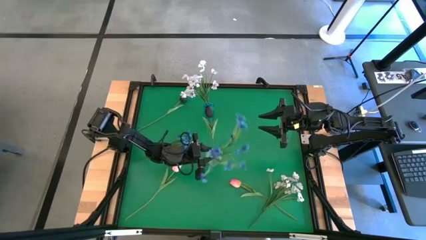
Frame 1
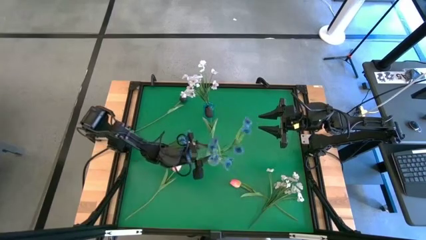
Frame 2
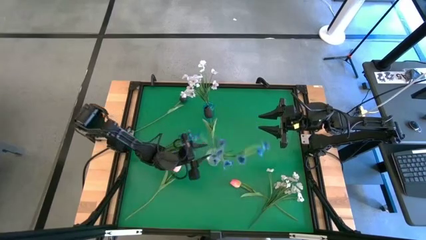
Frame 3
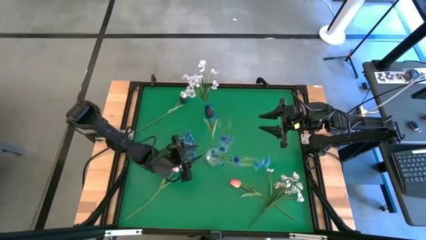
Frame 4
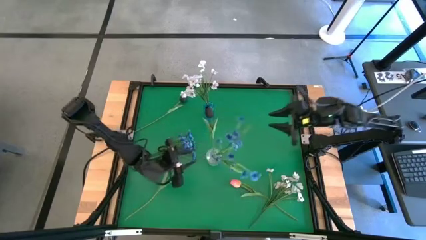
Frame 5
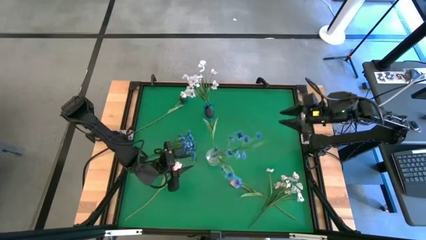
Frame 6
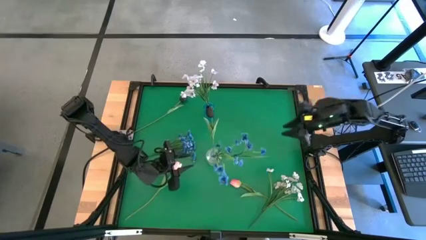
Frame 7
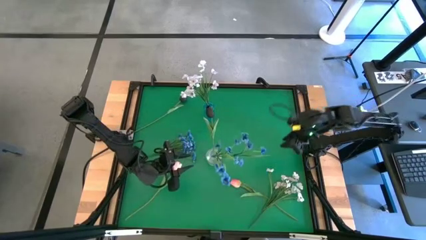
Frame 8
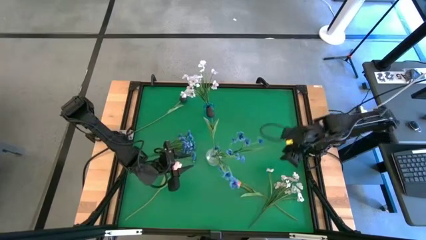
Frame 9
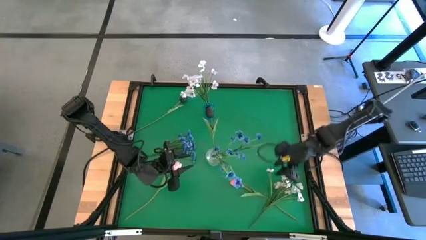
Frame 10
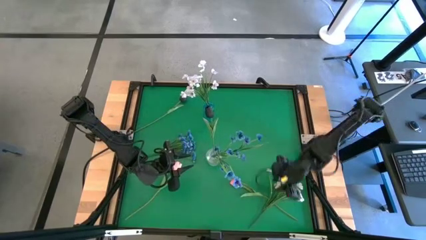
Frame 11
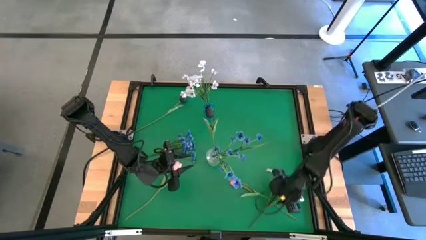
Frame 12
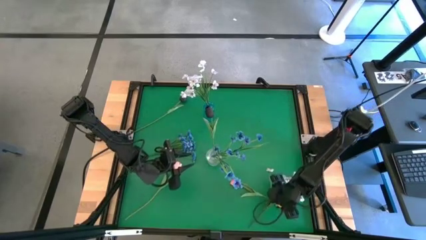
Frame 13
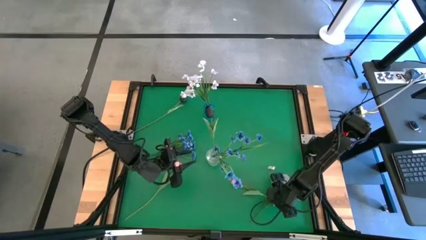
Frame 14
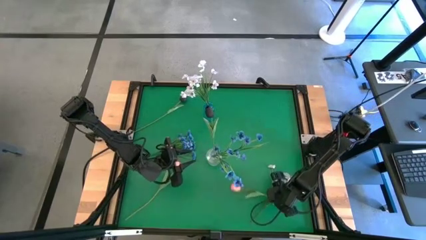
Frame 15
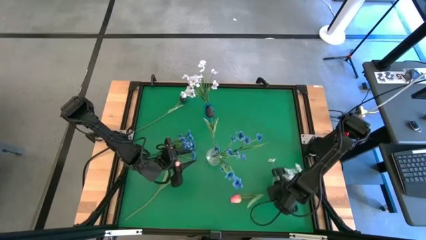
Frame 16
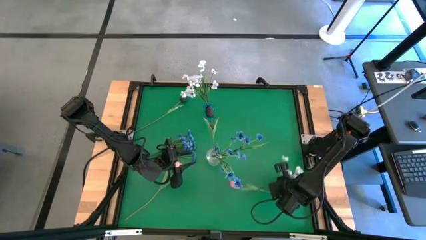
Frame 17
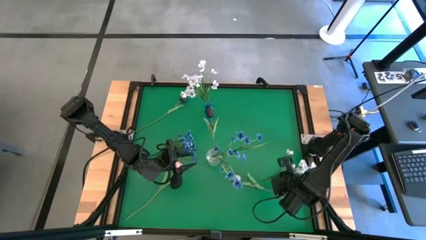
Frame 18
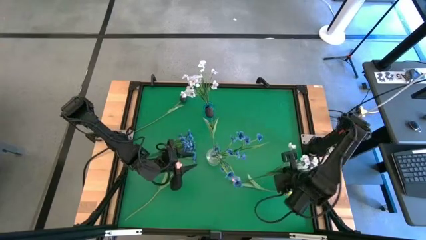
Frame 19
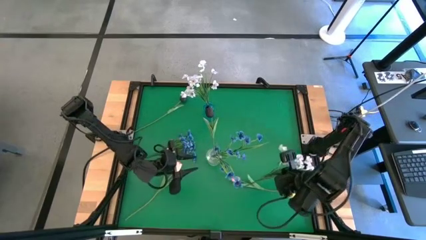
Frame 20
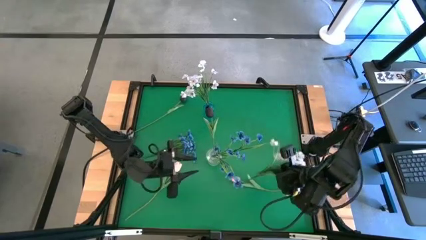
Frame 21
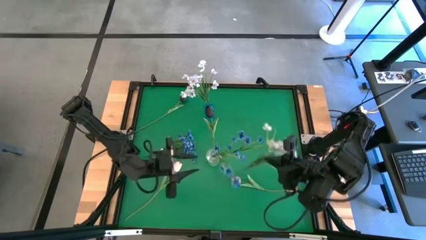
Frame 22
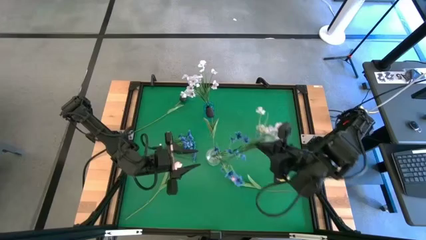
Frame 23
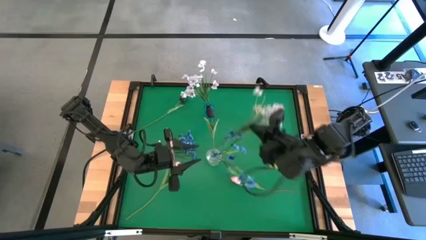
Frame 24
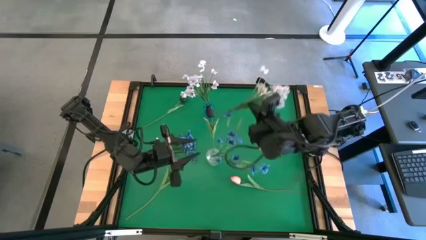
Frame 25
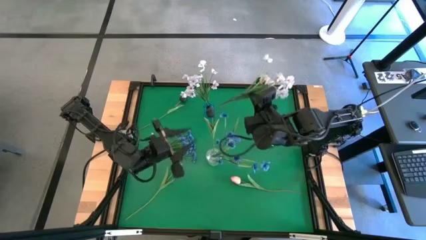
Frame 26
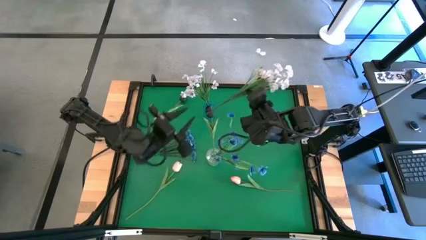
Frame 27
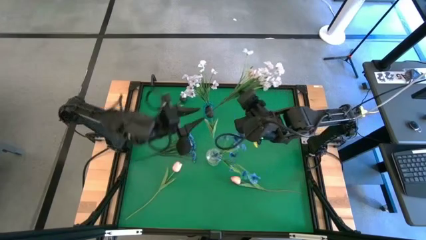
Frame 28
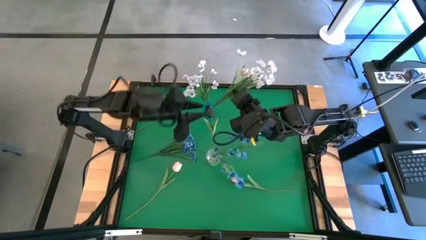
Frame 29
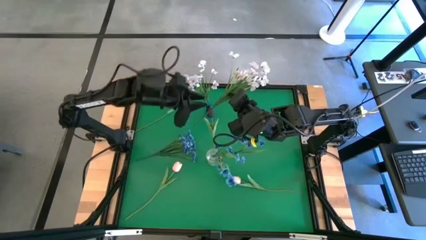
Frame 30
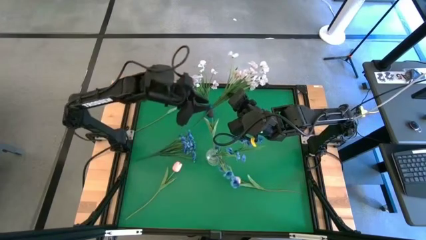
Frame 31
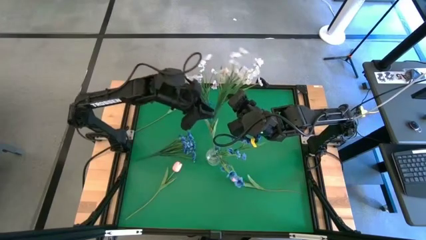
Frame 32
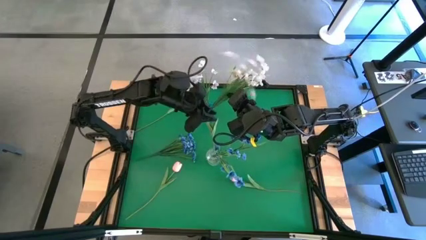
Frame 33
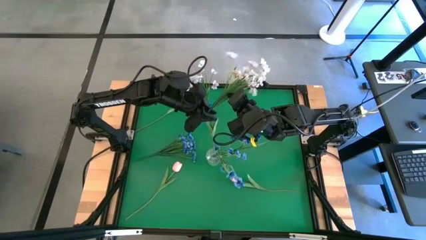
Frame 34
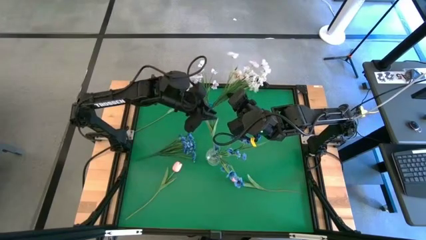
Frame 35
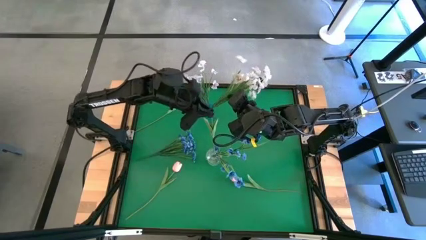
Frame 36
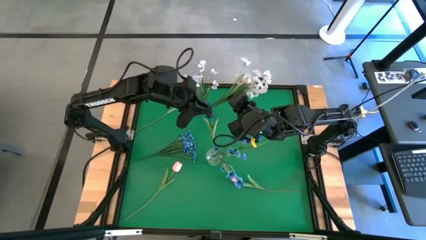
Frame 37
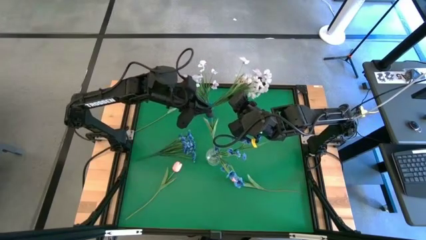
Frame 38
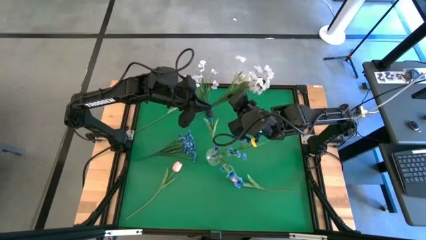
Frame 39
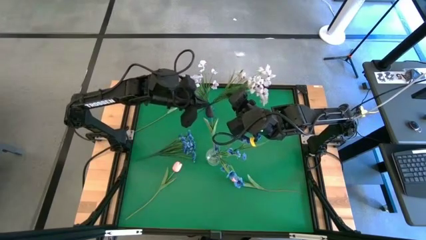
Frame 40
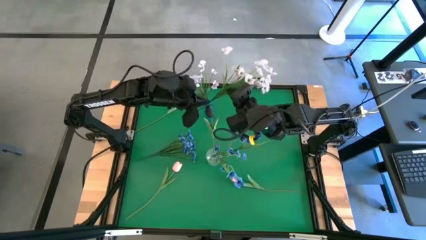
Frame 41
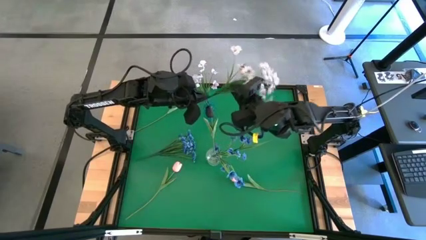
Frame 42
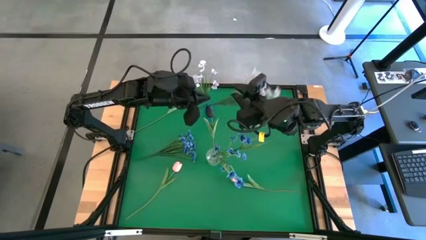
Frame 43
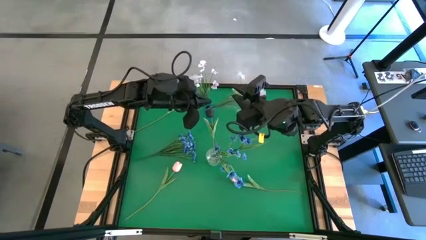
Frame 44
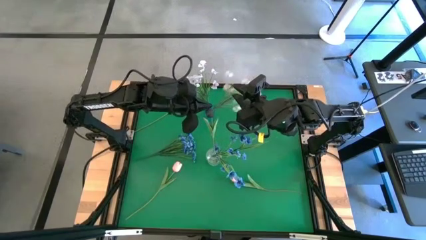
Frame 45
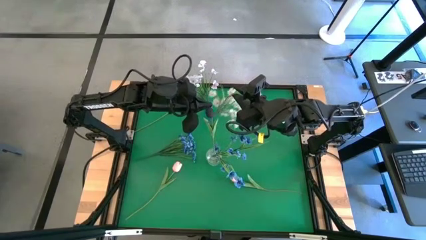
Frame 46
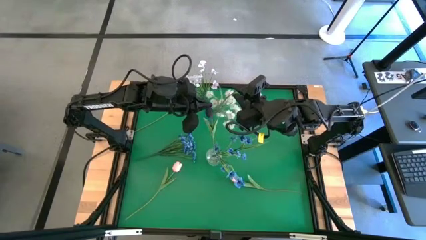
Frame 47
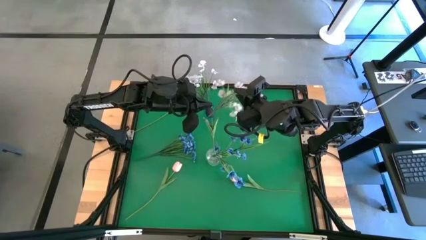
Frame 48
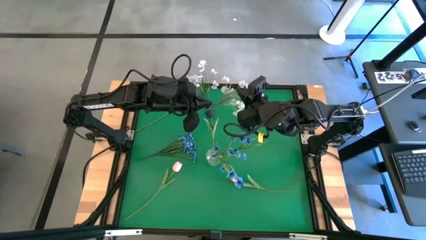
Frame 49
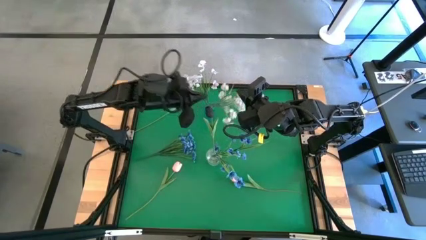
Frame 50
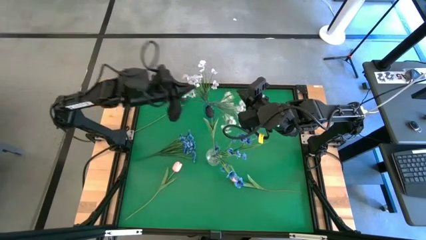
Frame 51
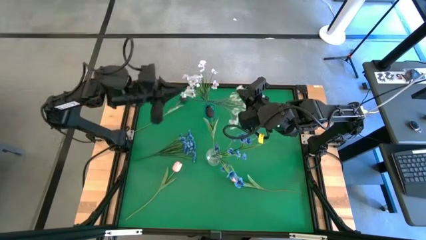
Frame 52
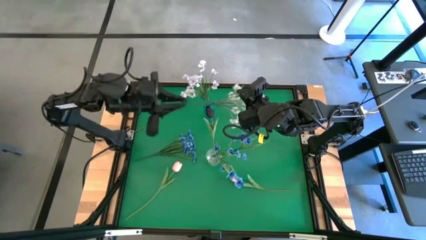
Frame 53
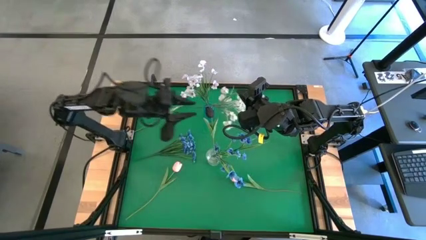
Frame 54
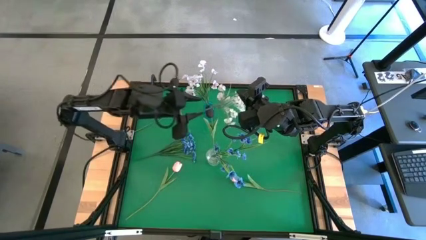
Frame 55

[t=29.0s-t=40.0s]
Task: Sort flowers into vase by color
Put the white flowers into the blue vase

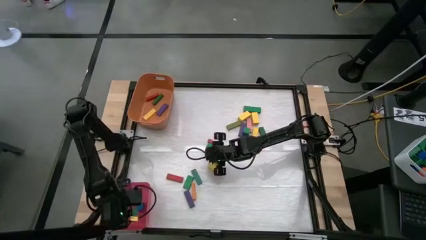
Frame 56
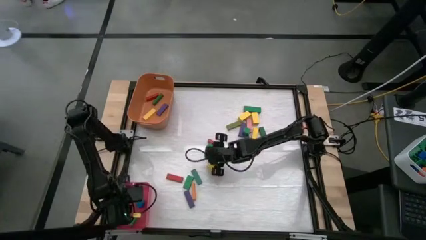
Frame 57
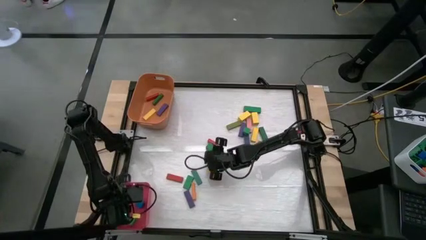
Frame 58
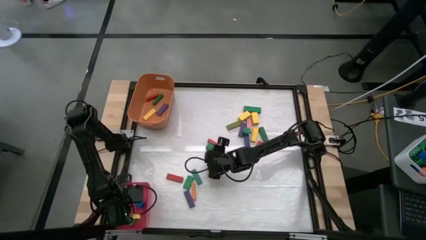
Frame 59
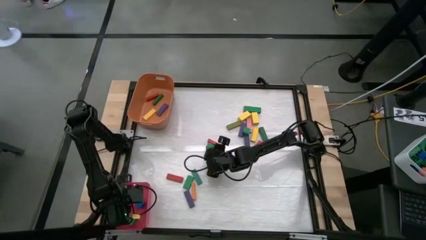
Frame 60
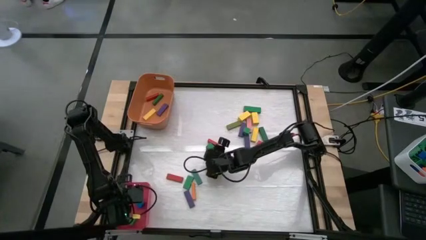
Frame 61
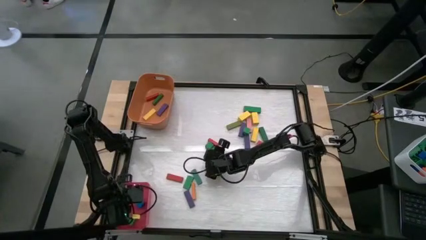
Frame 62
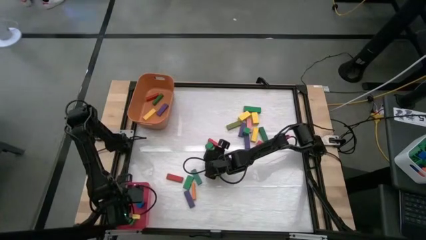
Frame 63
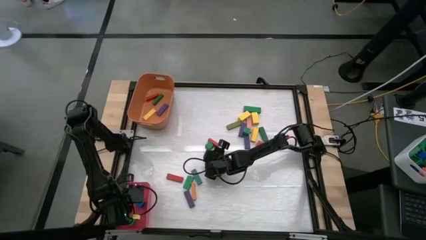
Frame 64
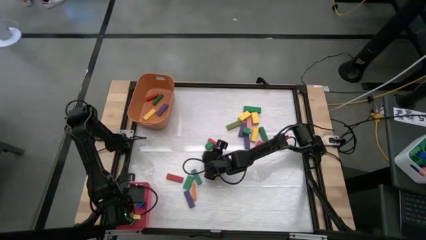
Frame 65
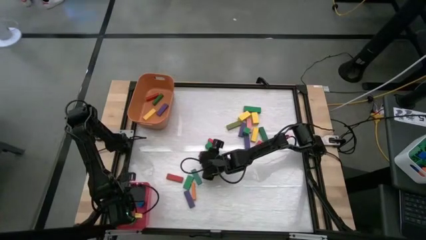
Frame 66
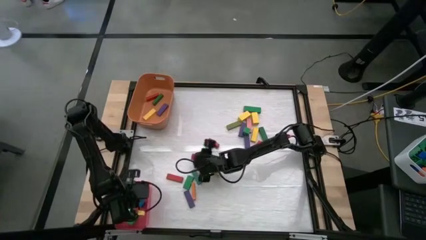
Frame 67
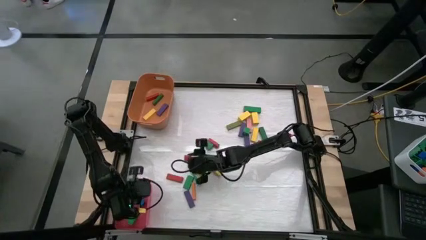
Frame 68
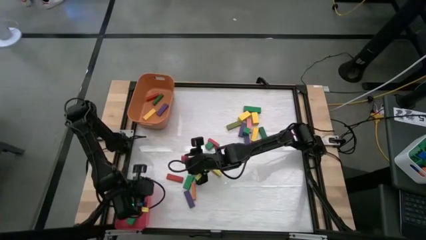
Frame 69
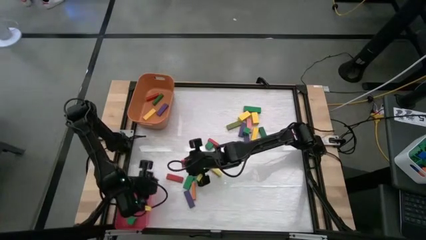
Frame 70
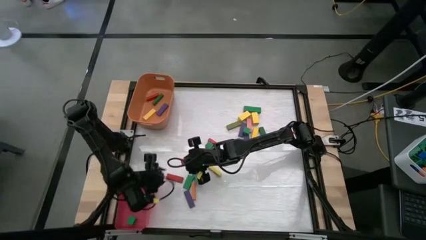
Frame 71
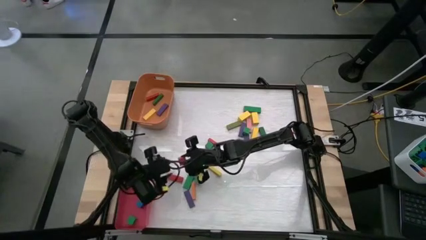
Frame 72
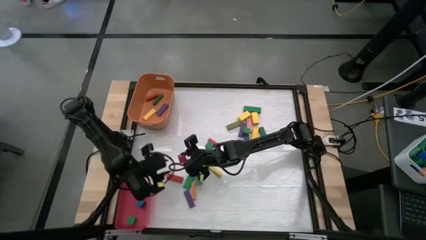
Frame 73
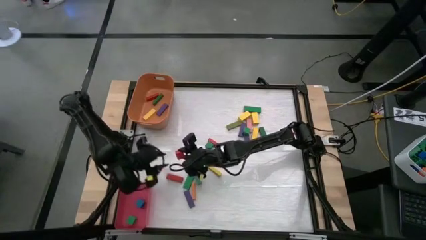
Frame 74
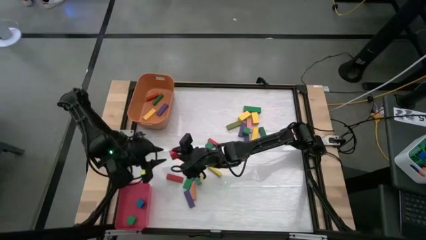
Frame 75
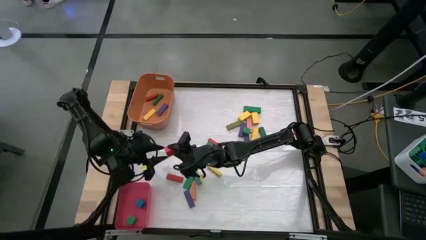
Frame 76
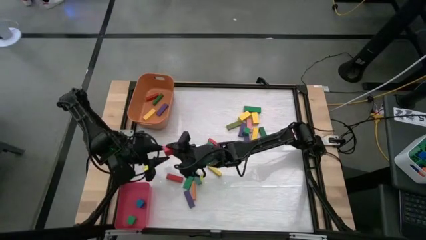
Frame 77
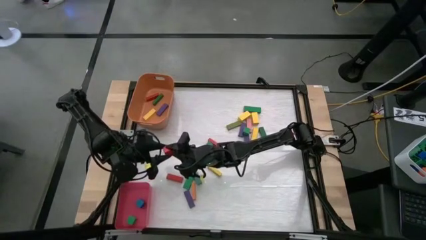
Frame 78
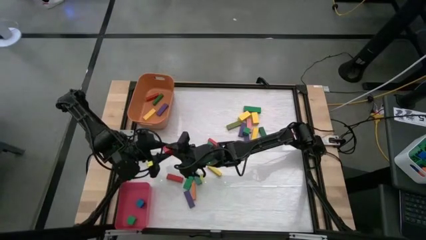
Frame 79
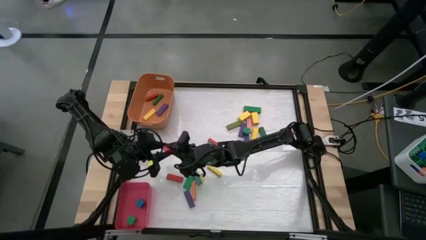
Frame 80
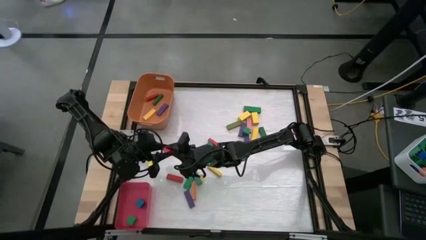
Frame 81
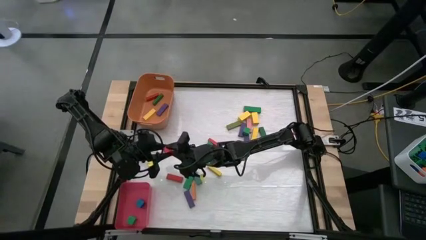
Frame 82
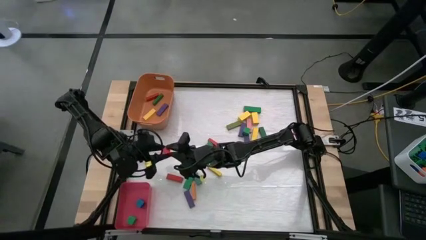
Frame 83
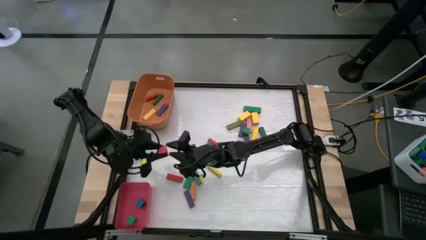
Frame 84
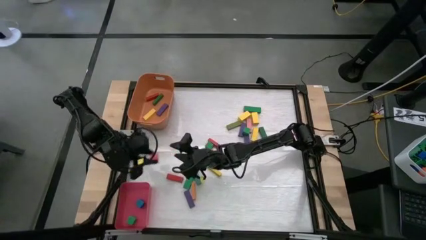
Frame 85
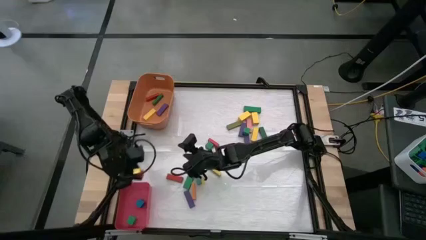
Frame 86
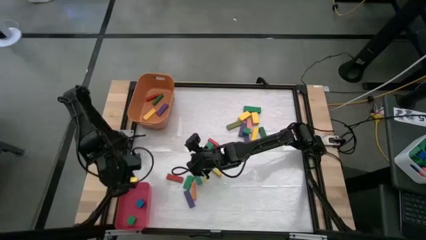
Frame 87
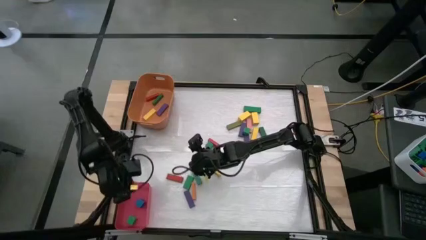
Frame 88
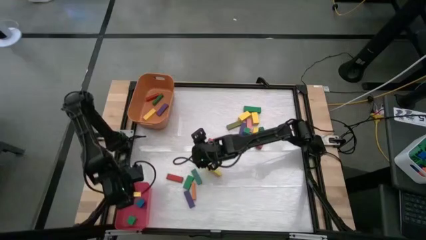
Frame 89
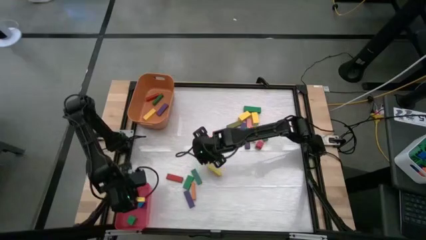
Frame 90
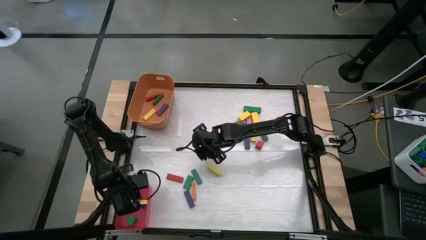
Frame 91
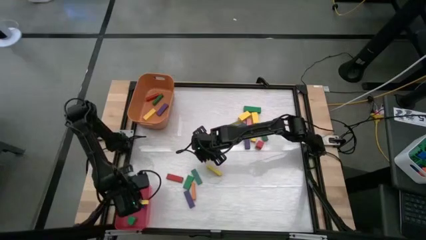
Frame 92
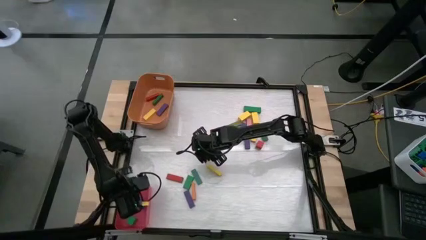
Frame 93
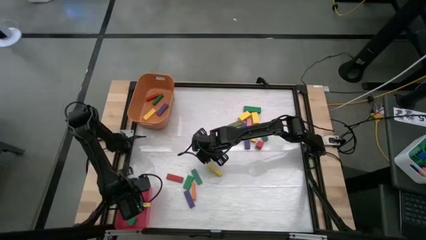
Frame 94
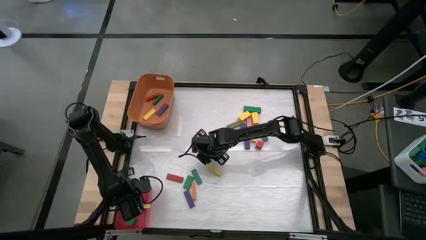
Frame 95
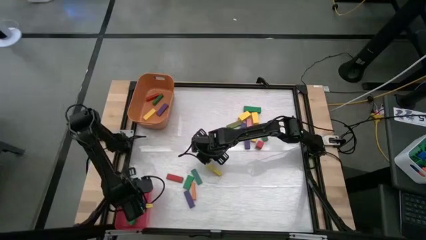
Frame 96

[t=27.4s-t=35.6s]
Task: Sort blocks by size
Put the small red block into the red bin
